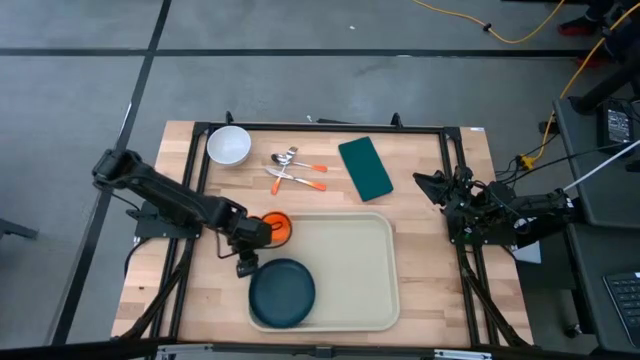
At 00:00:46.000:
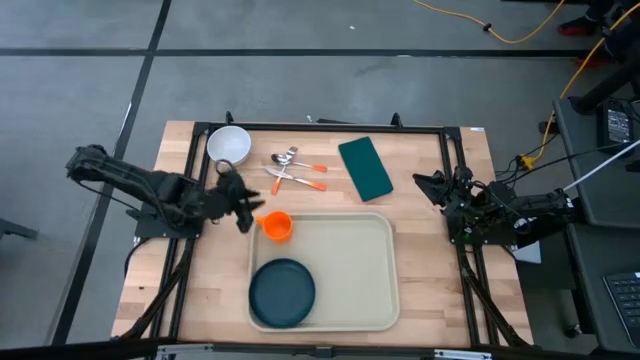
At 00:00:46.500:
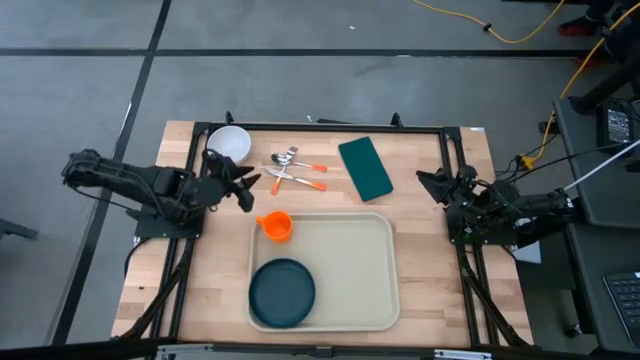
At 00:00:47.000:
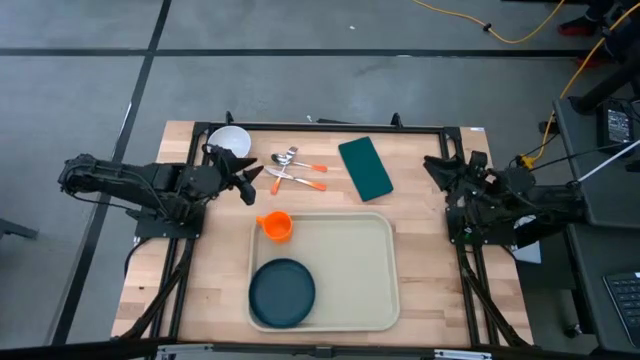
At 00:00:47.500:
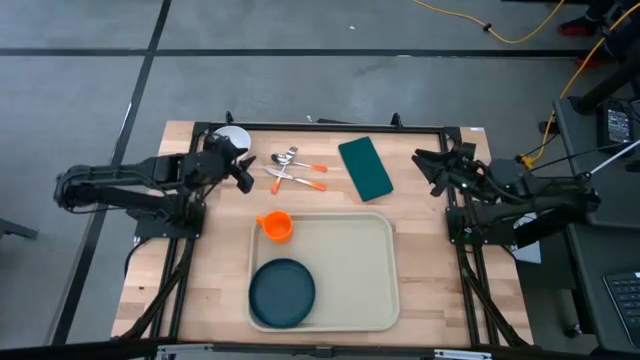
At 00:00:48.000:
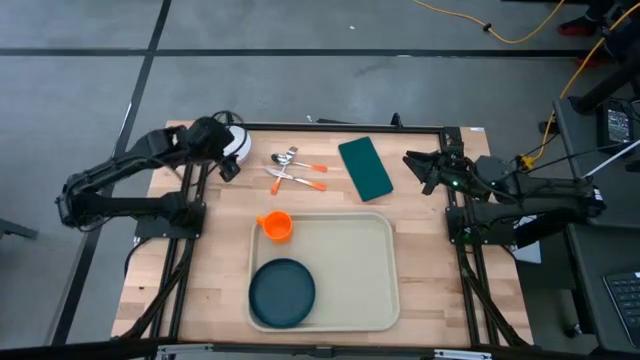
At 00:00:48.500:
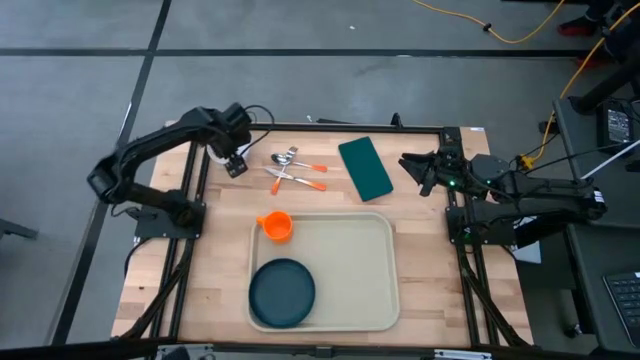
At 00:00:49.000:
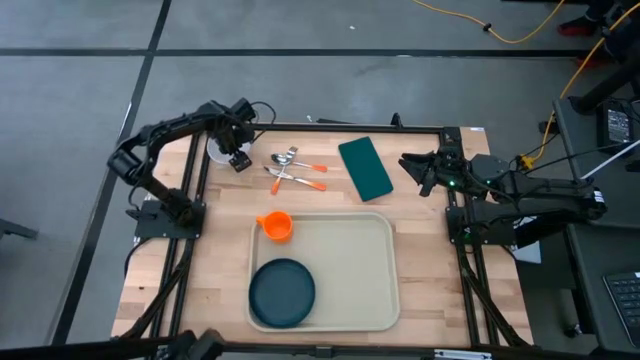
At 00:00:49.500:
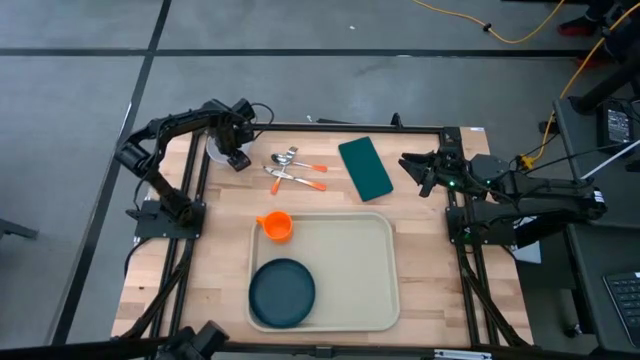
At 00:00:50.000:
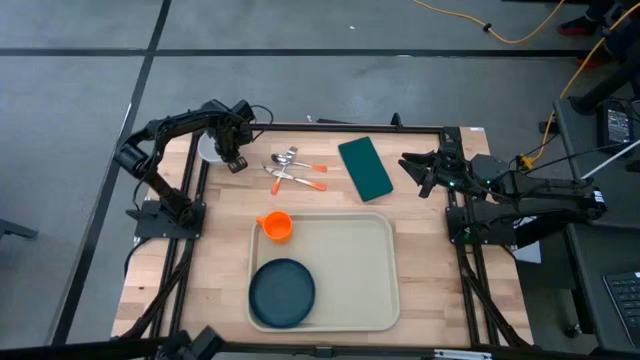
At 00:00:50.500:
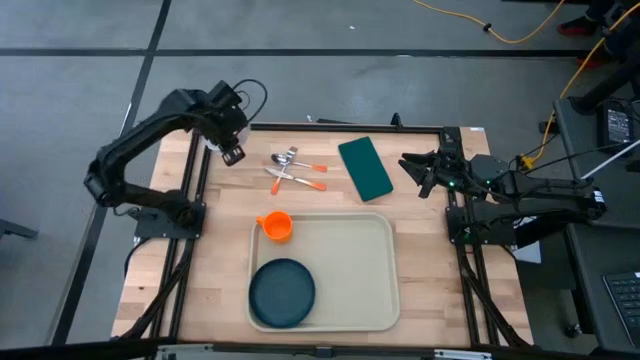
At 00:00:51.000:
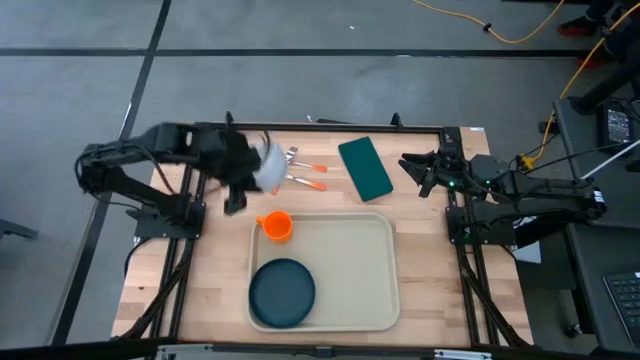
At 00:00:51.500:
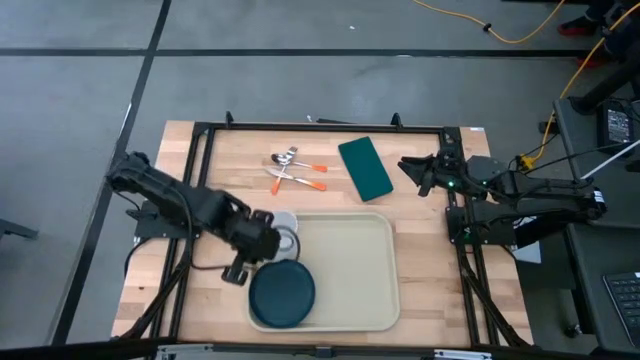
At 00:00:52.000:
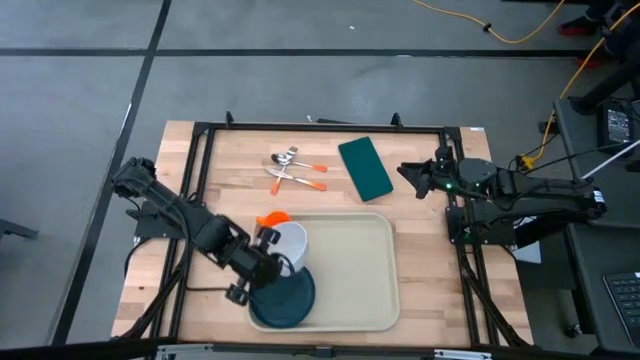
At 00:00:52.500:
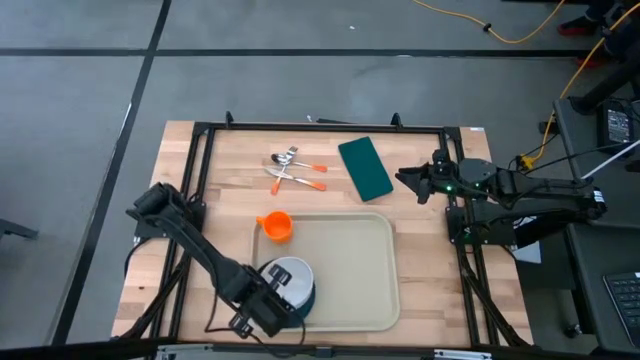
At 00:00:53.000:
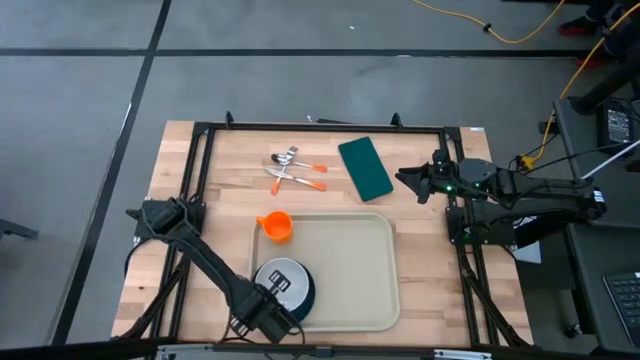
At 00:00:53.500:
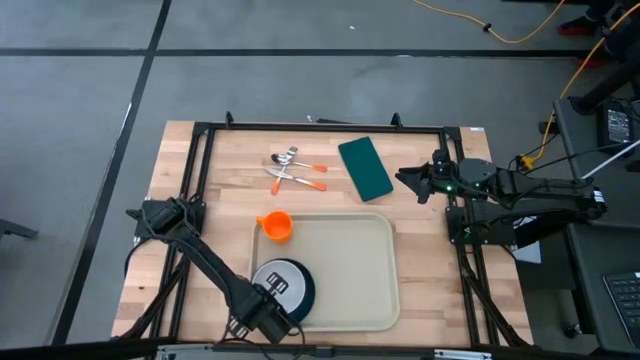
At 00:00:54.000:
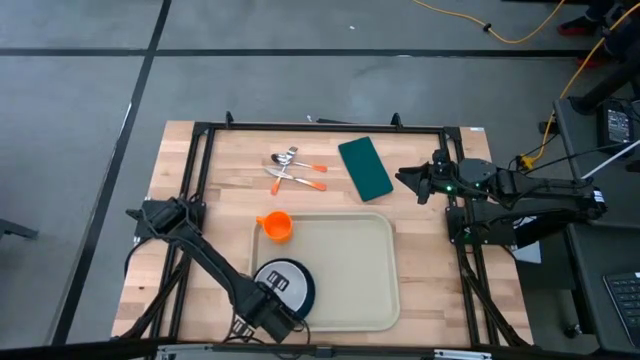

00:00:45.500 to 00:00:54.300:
Task: Set up tray
Put the white bowl on the black plate on the gray serving tray

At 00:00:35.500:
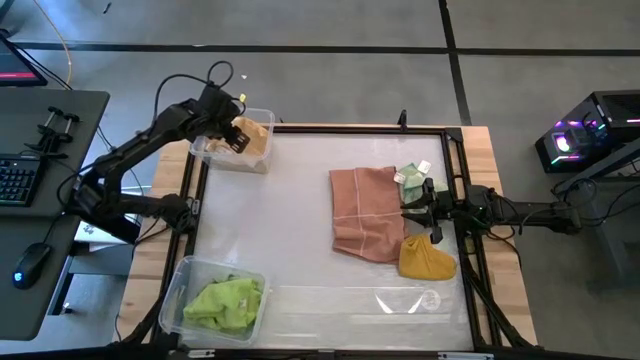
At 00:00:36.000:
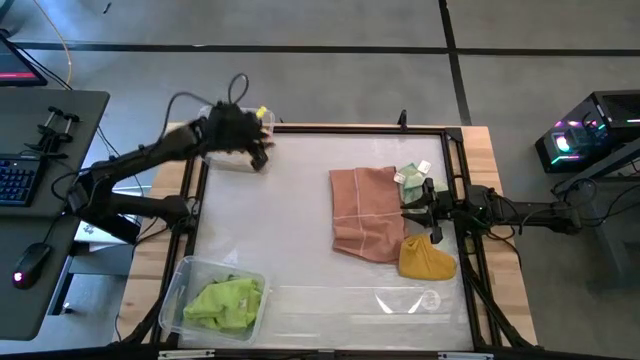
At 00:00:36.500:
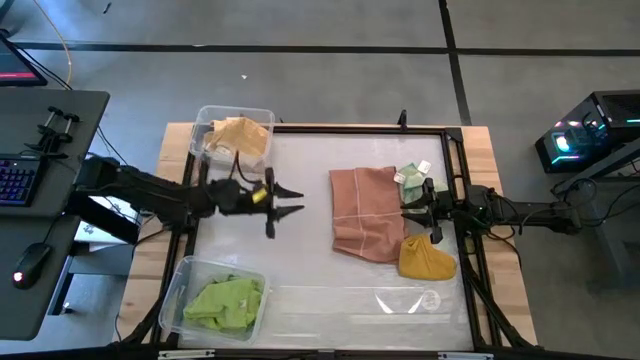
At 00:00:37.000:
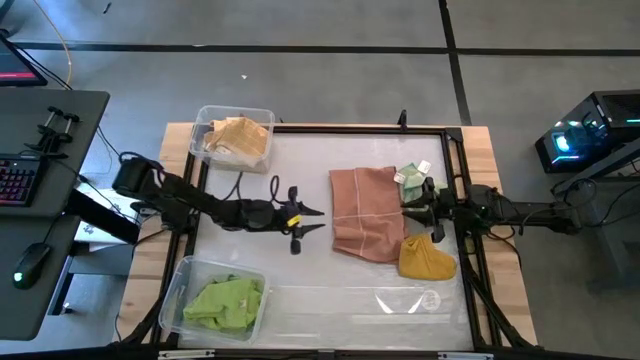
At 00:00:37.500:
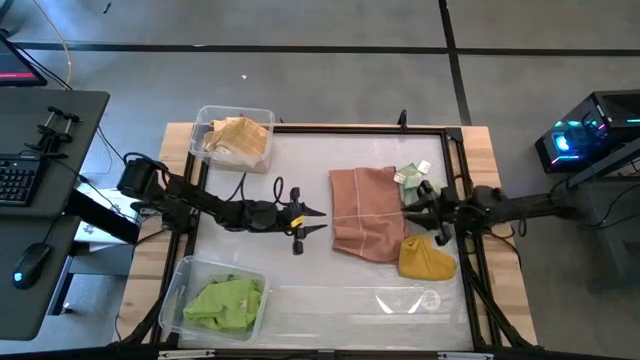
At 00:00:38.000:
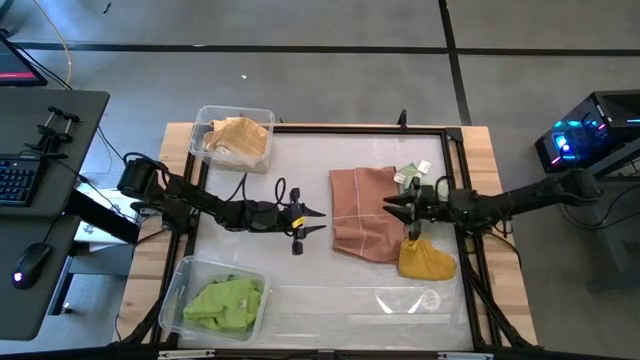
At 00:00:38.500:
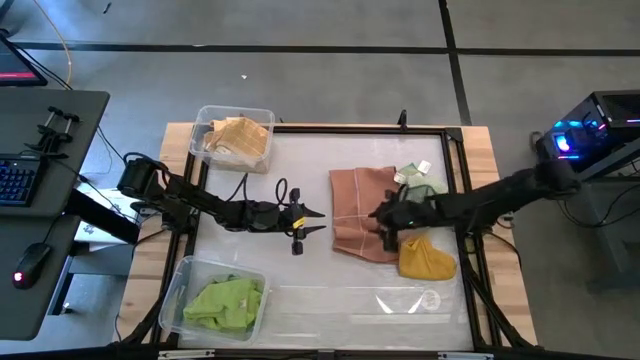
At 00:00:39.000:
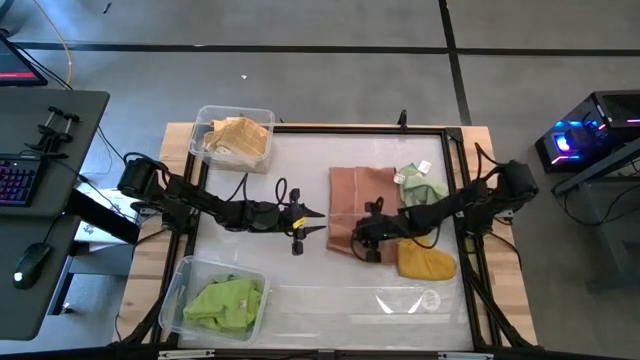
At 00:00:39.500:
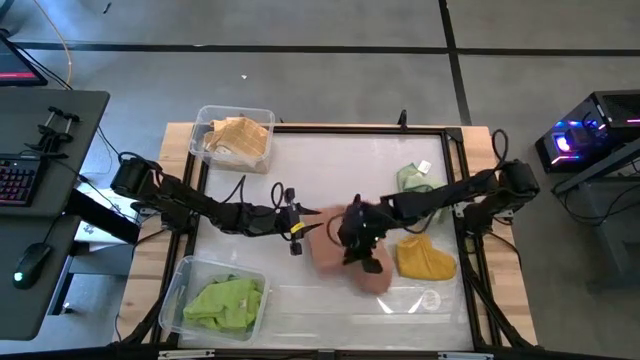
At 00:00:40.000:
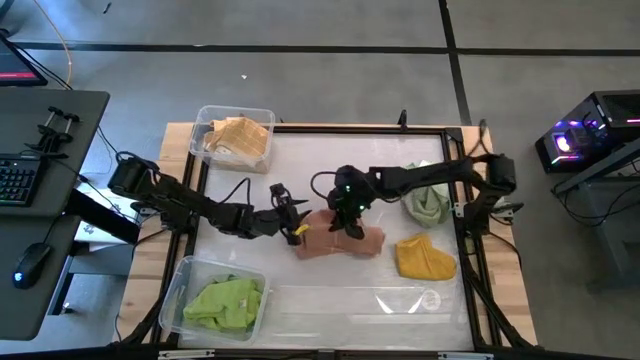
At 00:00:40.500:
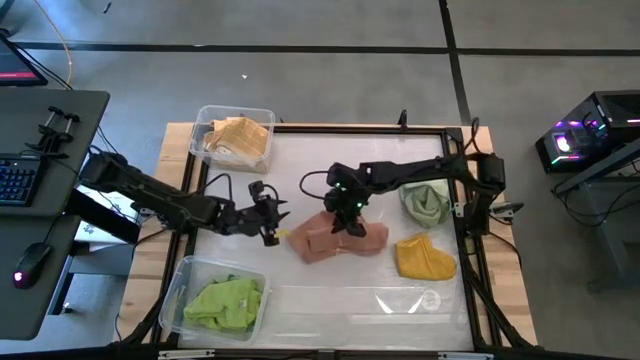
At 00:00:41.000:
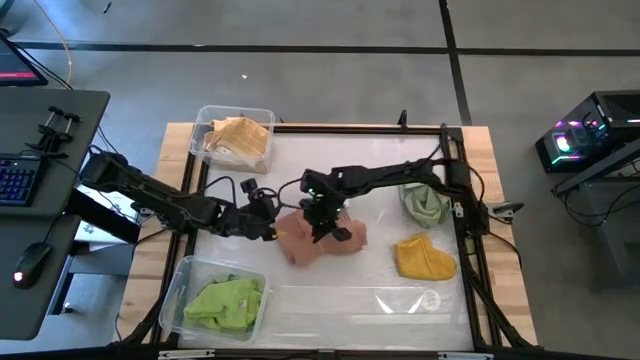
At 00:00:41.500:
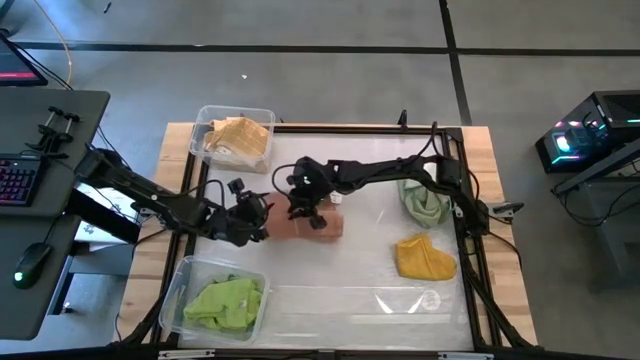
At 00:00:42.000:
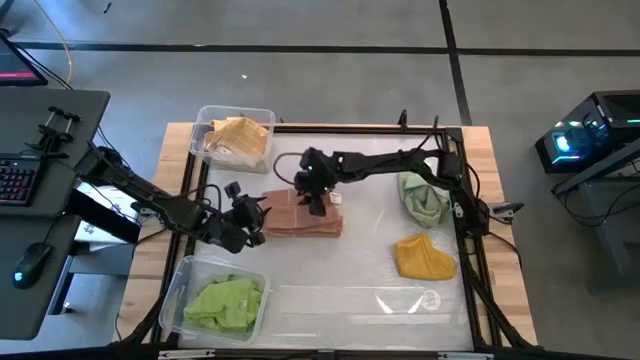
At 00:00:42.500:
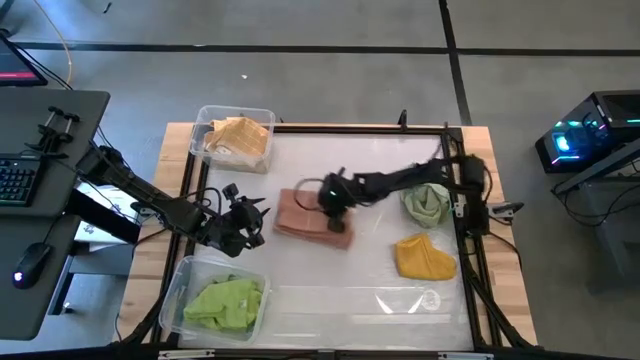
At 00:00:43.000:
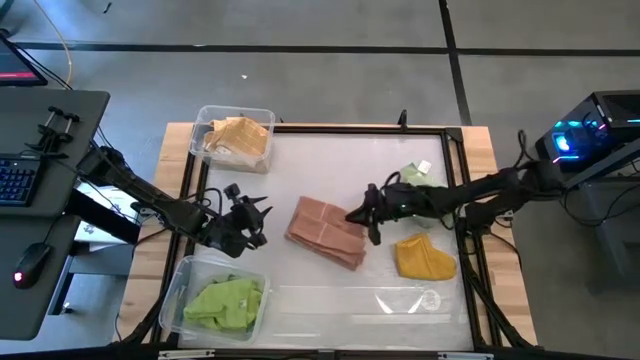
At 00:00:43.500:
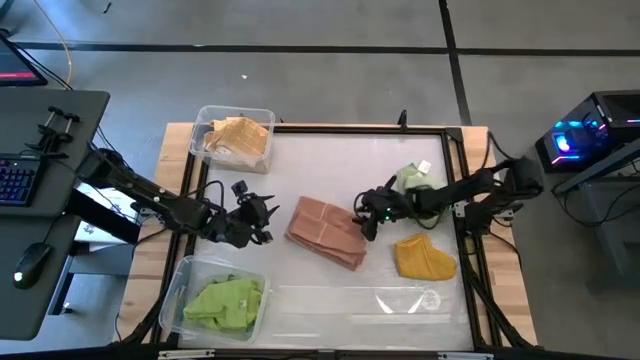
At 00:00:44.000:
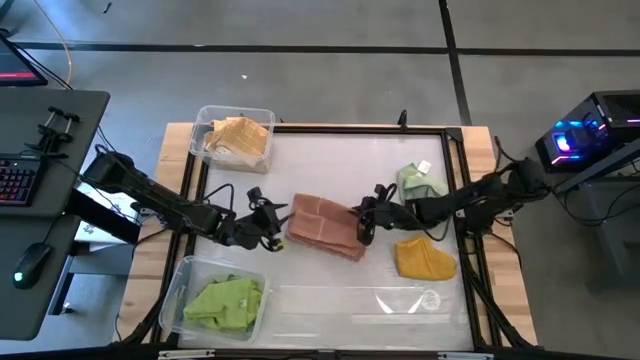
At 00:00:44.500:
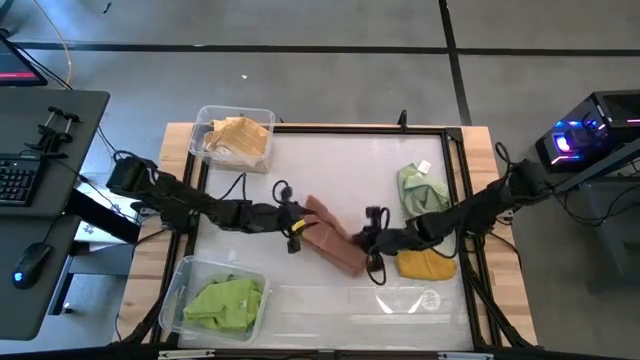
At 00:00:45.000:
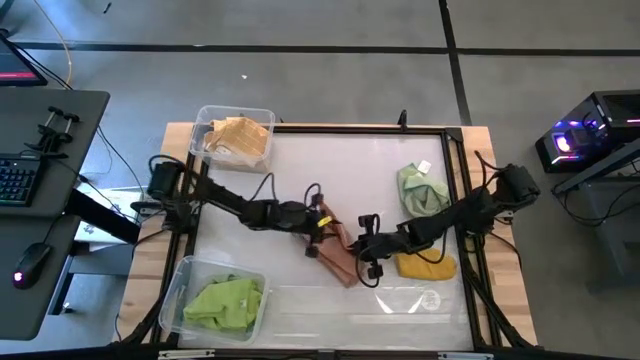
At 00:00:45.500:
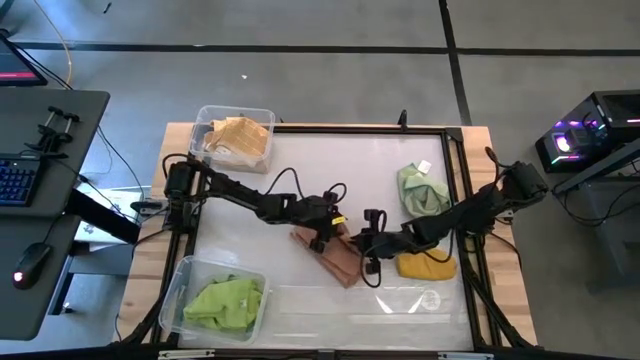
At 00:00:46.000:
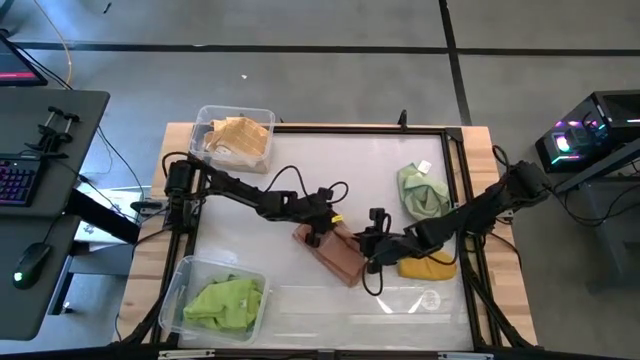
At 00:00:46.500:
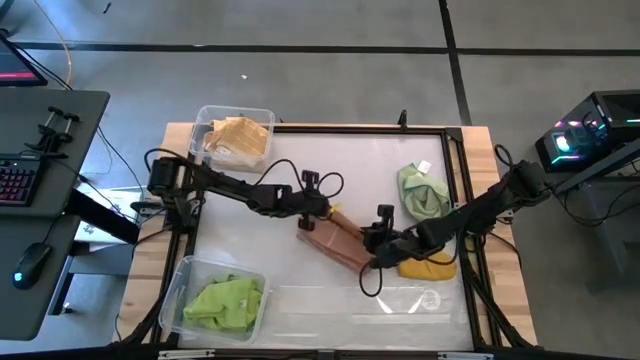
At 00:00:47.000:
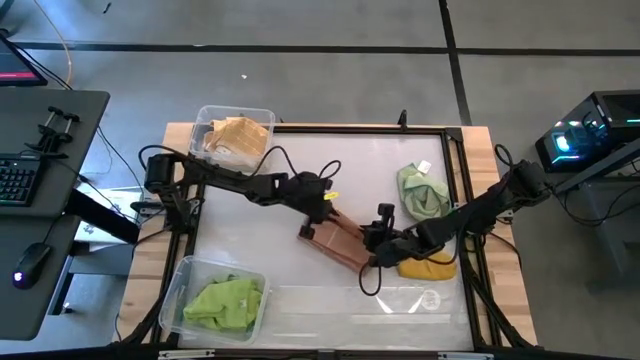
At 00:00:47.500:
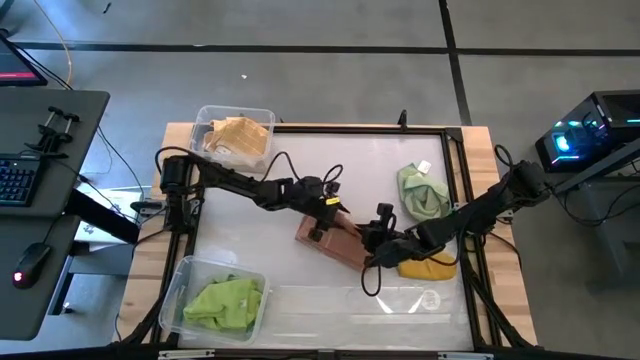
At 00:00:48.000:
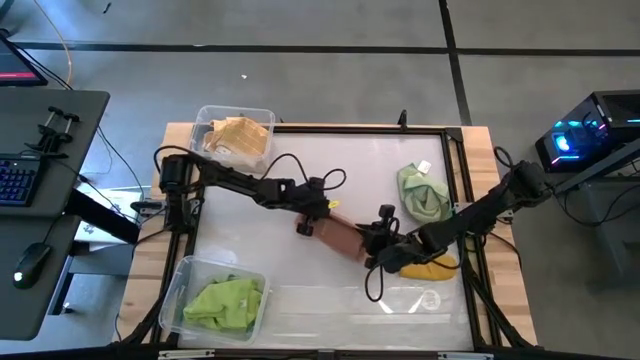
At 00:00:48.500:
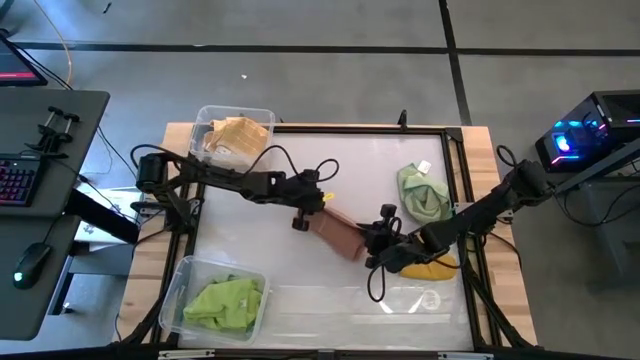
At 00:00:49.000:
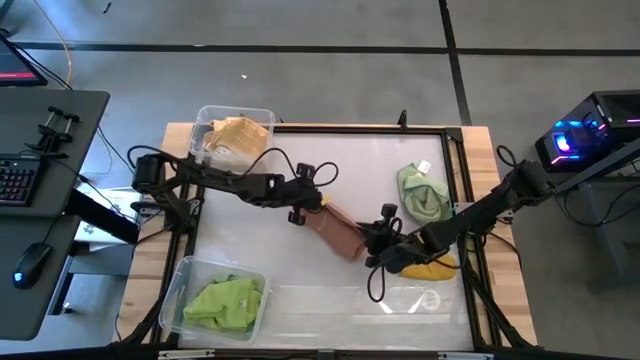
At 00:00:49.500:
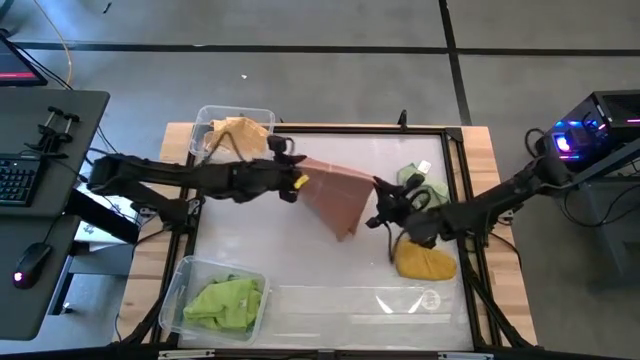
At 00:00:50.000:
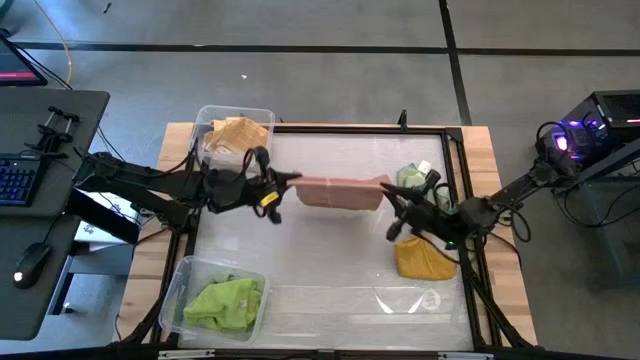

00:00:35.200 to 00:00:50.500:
Task: Sort towels by color in basket
Fold the brown towel
